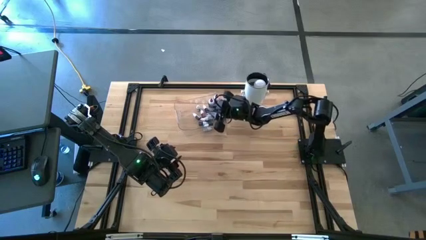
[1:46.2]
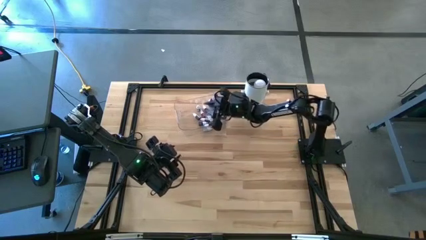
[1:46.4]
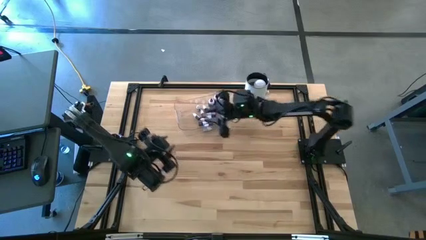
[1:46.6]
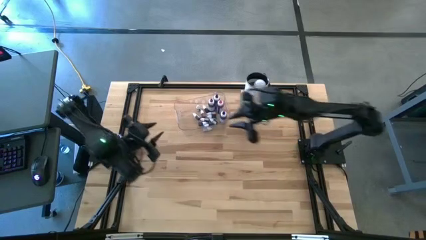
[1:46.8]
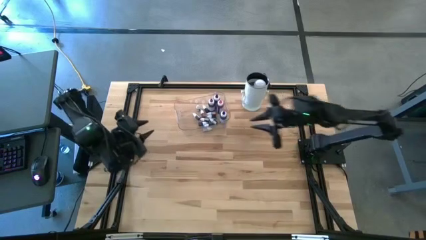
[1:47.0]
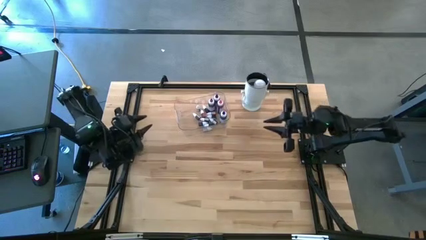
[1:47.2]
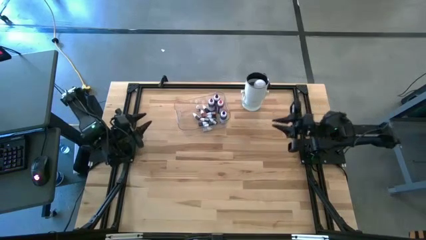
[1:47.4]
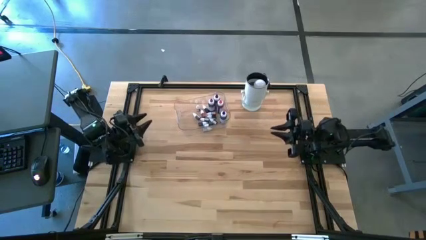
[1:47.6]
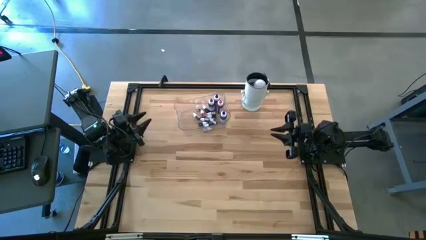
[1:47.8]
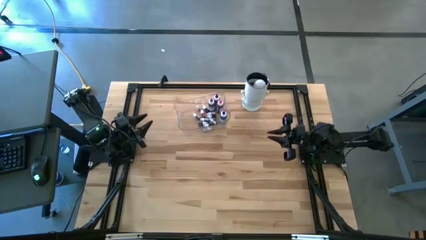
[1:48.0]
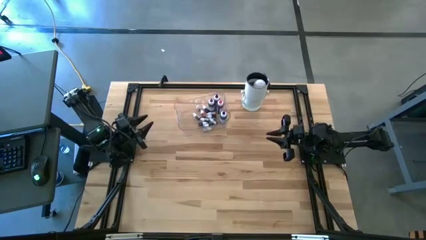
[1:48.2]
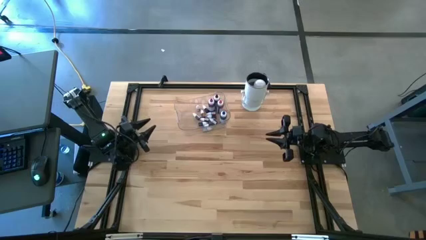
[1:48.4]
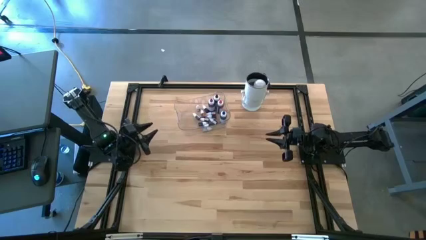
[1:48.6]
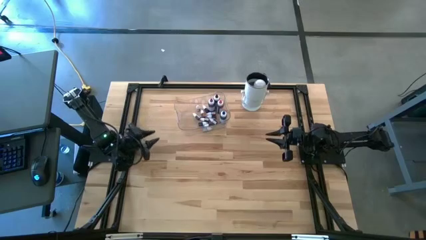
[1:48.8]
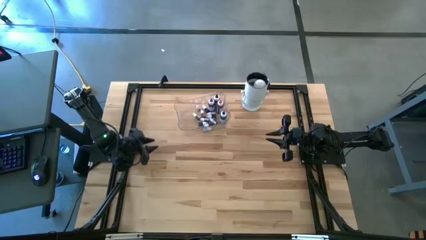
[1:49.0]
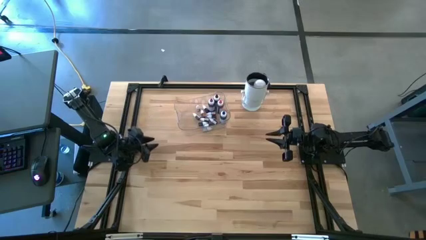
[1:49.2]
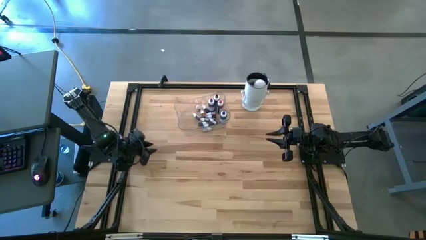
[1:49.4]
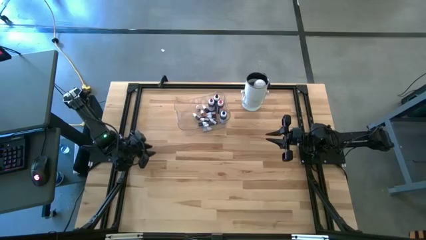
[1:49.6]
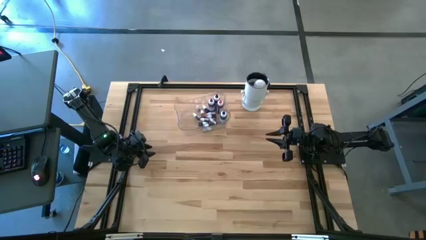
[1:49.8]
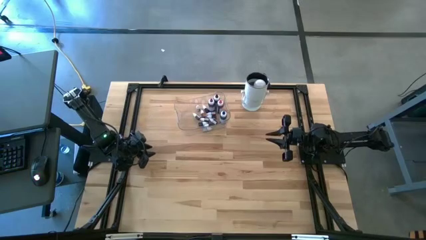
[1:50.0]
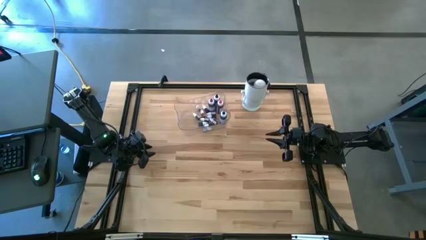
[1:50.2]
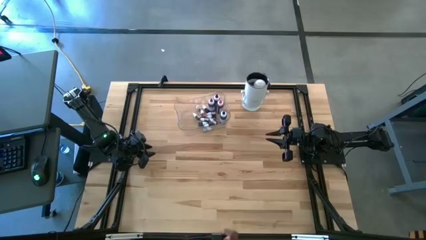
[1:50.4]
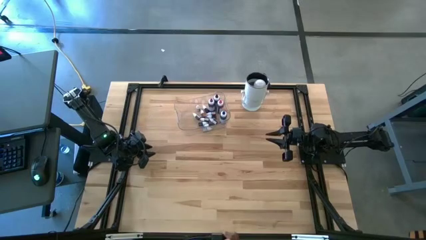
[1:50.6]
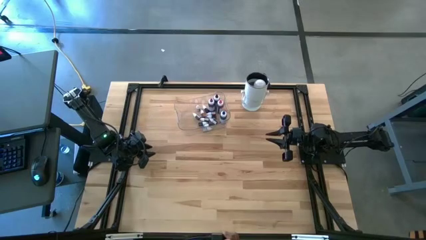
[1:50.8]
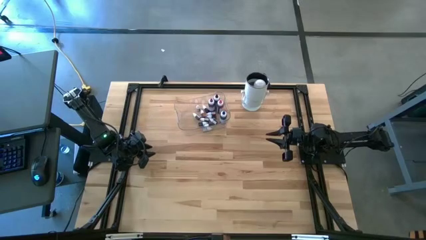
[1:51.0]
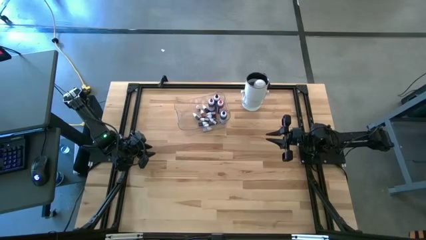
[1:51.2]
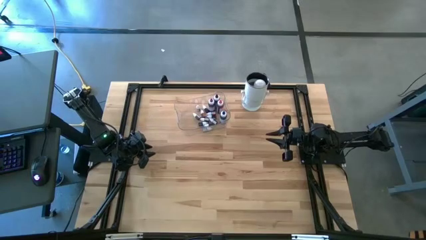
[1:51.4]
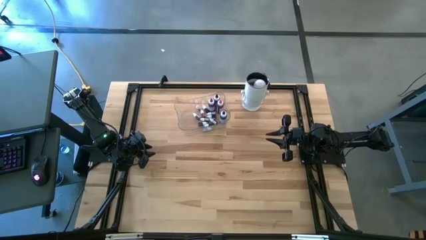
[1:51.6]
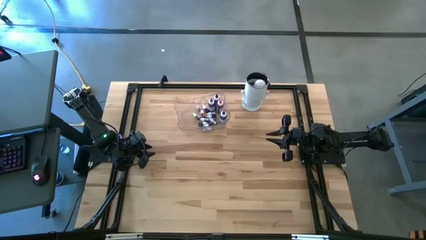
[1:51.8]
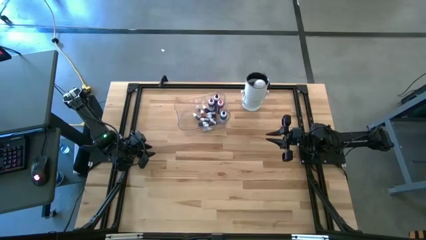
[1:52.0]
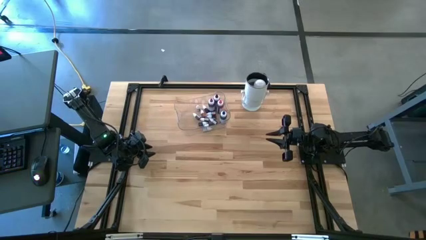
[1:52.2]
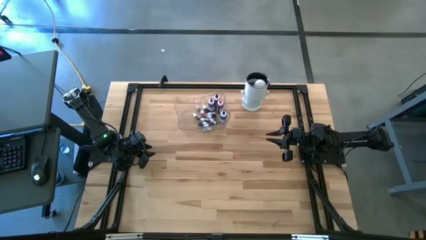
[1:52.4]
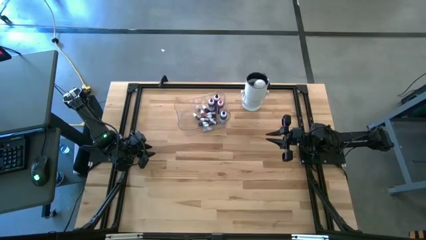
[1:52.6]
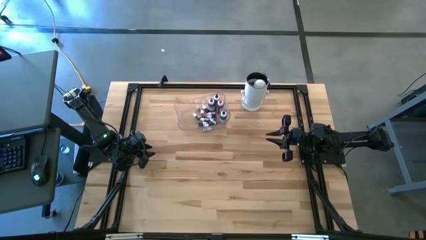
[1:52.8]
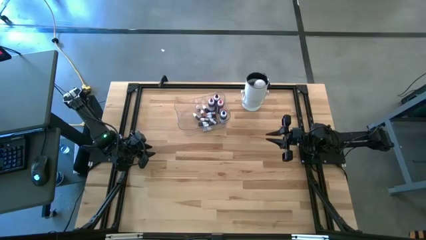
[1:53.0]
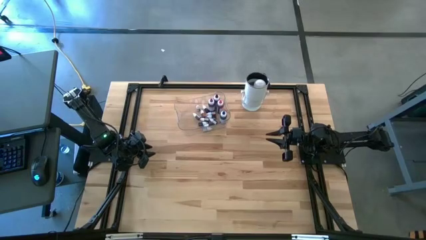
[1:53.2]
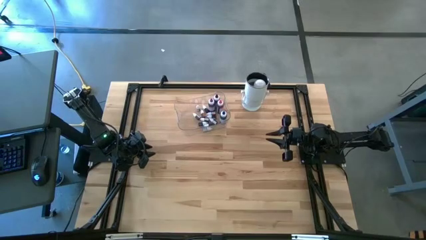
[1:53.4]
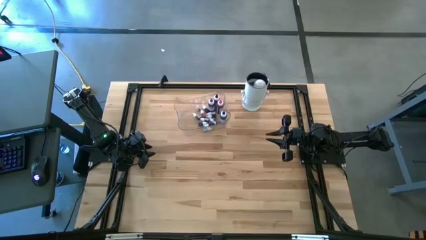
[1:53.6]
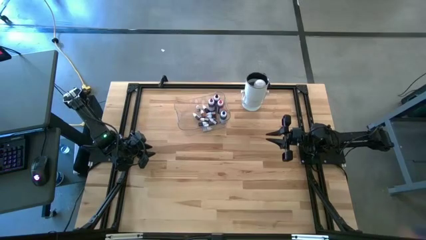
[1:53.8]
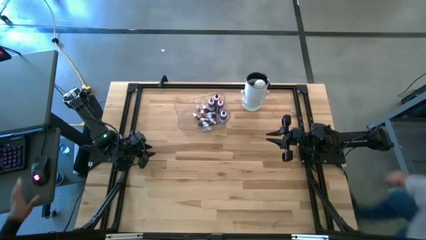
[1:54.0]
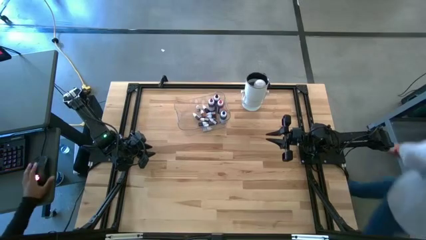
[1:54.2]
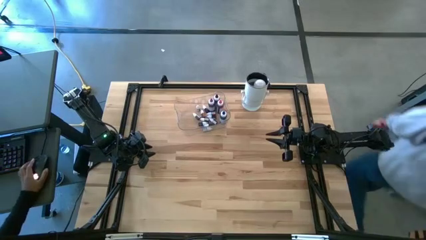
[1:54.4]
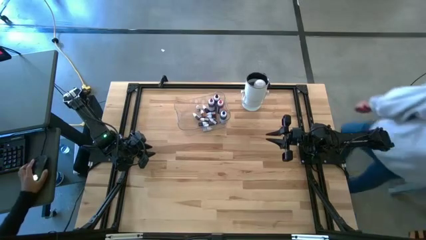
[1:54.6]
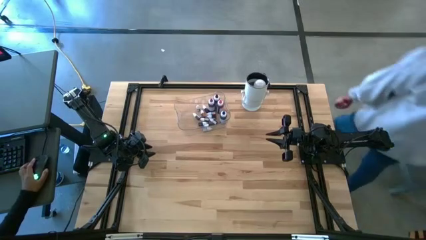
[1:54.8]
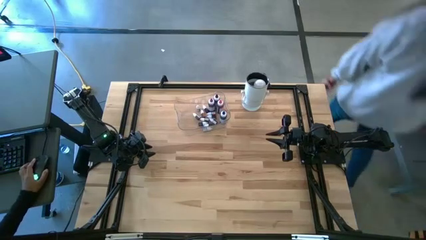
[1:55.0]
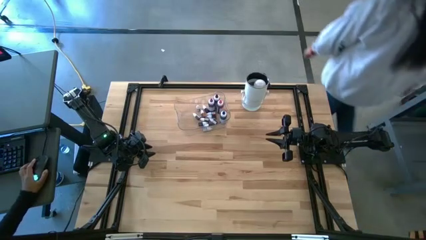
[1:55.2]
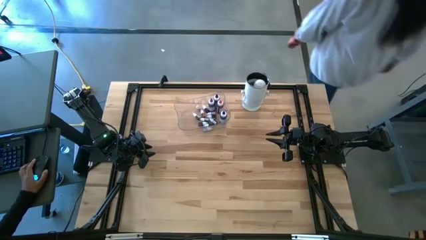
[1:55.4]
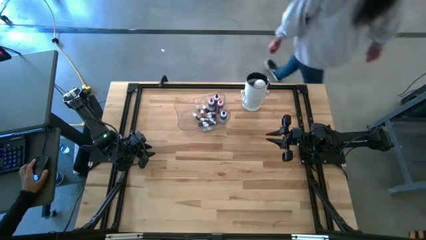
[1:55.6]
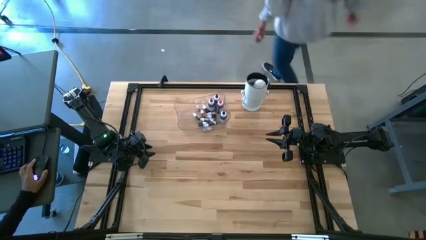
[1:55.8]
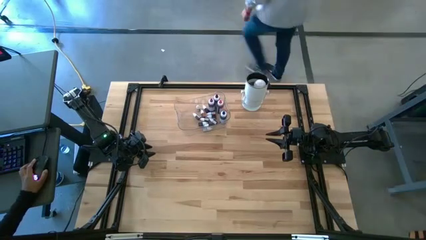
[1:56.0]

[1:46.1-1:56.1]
Task: Pick & Place food coloring
Return to Home Position

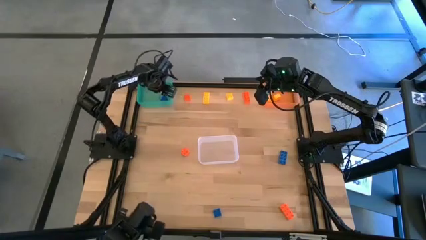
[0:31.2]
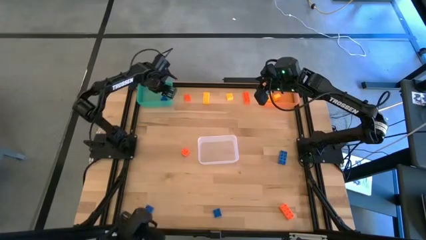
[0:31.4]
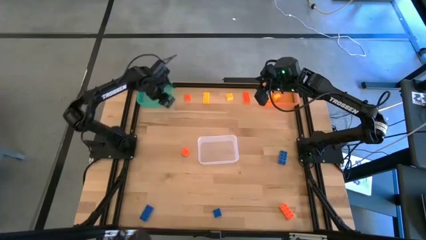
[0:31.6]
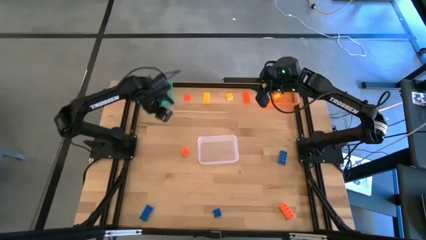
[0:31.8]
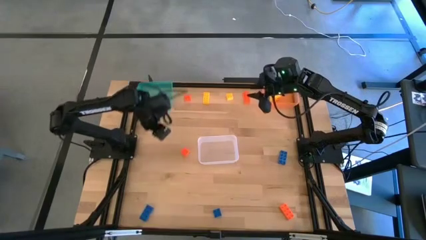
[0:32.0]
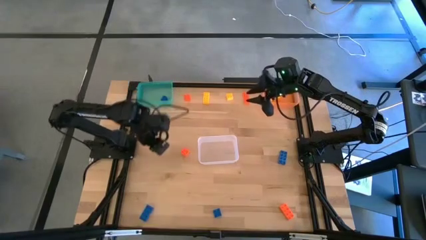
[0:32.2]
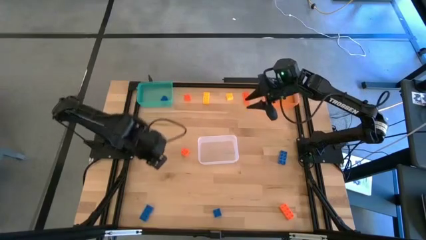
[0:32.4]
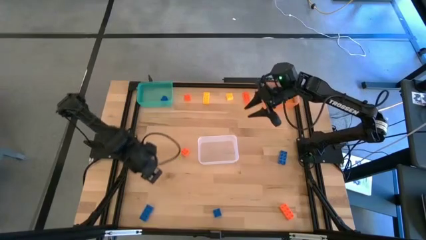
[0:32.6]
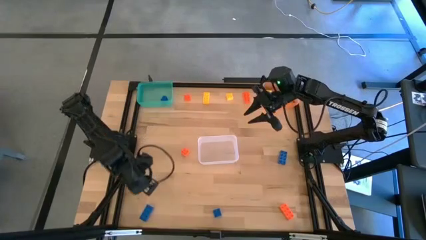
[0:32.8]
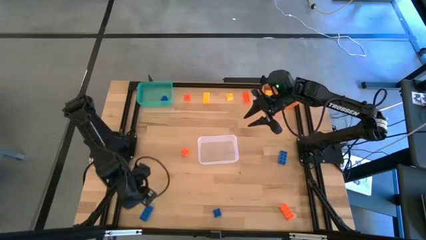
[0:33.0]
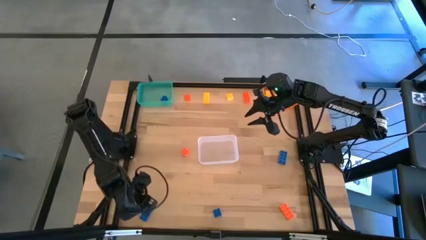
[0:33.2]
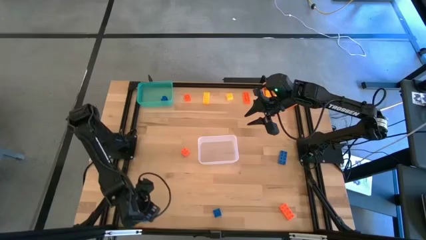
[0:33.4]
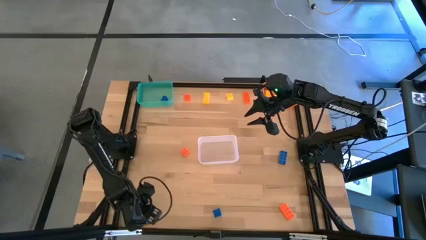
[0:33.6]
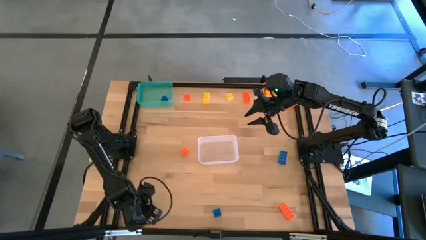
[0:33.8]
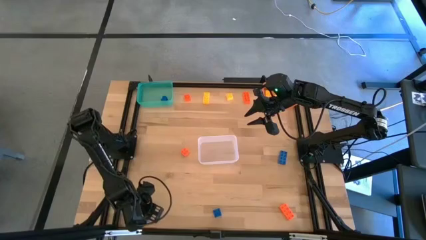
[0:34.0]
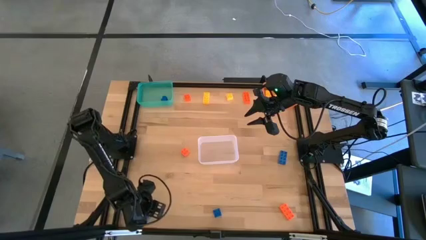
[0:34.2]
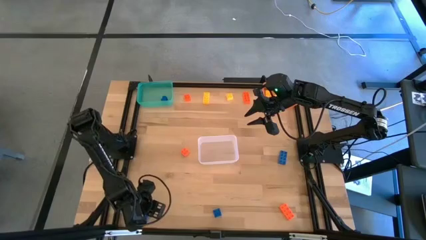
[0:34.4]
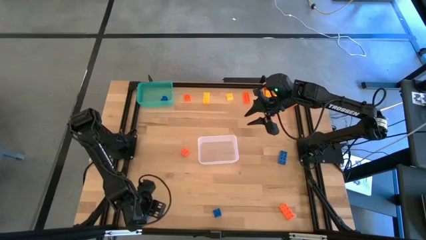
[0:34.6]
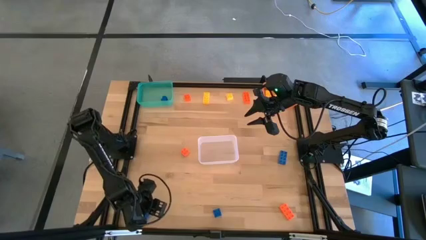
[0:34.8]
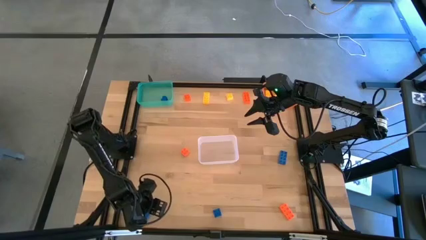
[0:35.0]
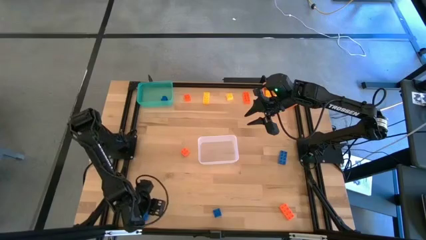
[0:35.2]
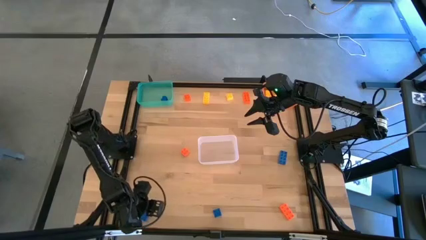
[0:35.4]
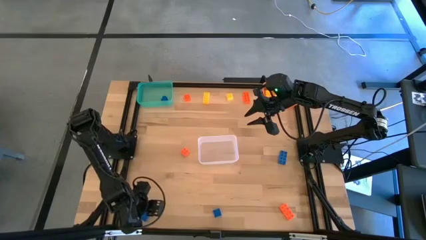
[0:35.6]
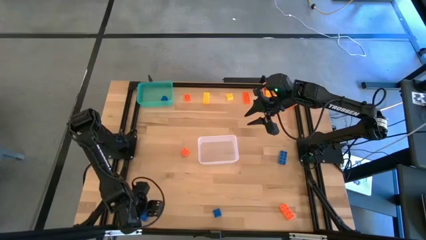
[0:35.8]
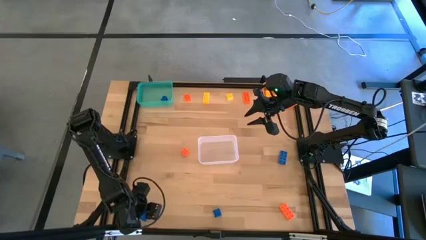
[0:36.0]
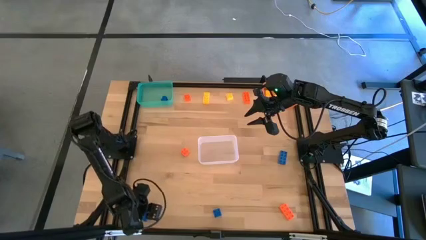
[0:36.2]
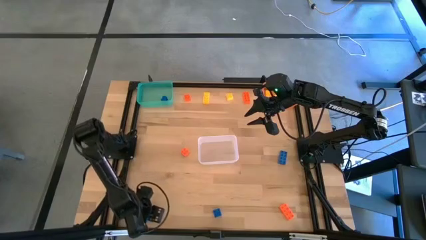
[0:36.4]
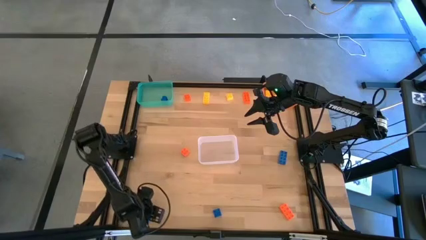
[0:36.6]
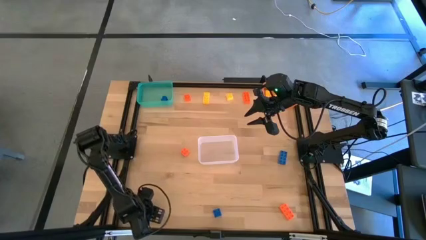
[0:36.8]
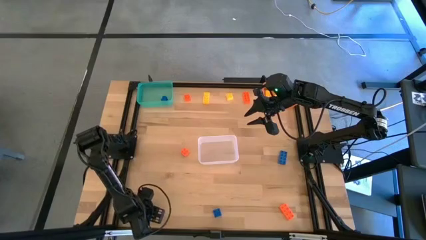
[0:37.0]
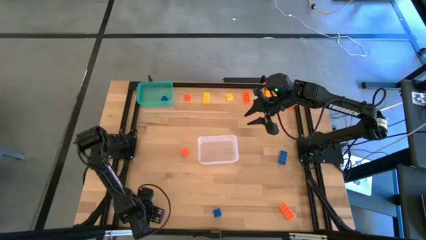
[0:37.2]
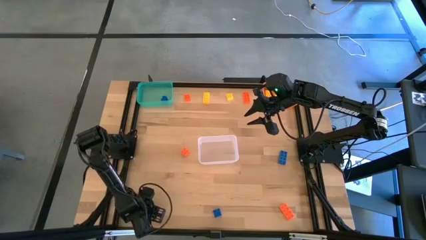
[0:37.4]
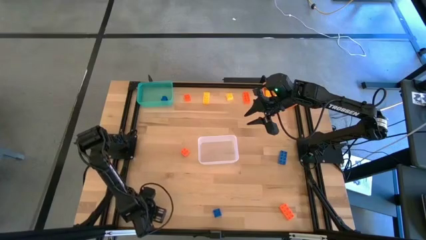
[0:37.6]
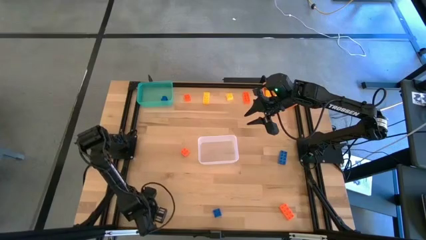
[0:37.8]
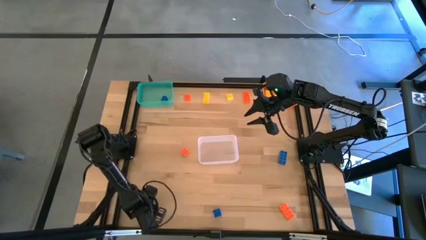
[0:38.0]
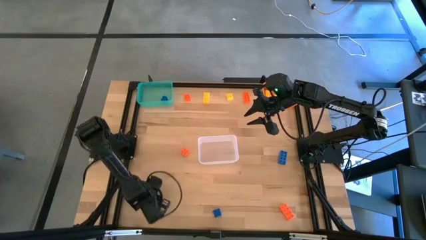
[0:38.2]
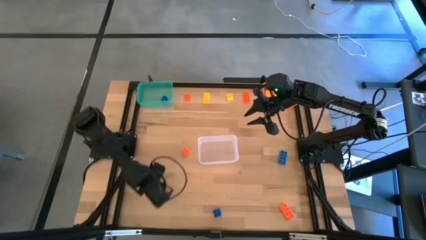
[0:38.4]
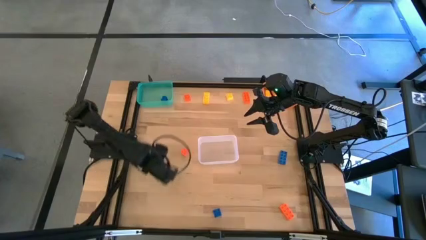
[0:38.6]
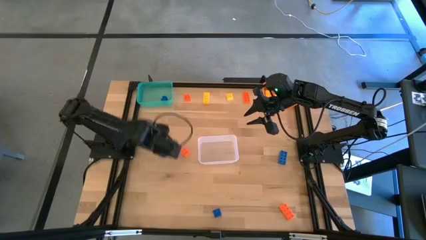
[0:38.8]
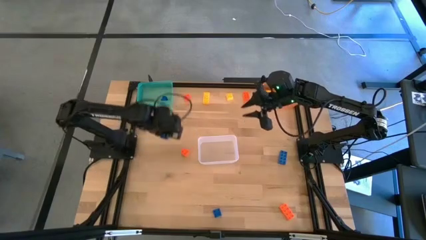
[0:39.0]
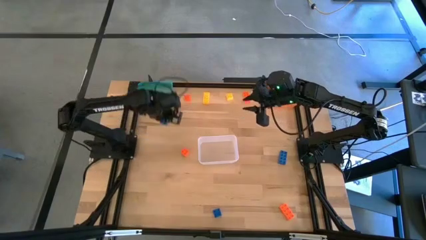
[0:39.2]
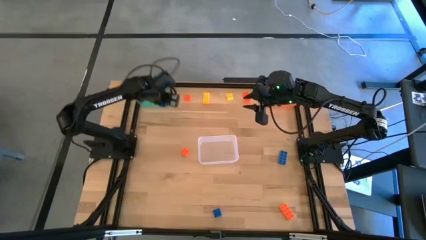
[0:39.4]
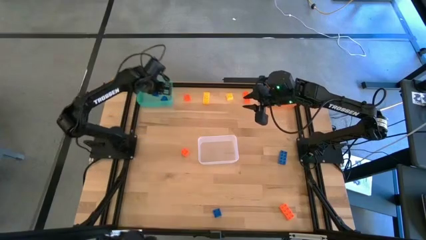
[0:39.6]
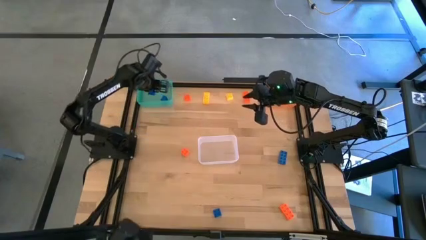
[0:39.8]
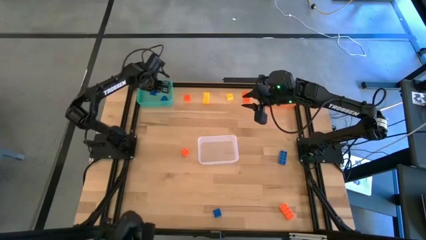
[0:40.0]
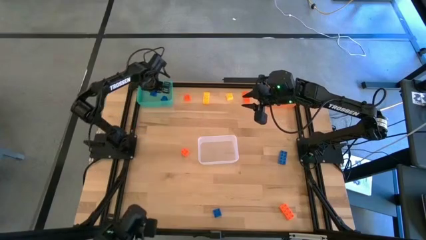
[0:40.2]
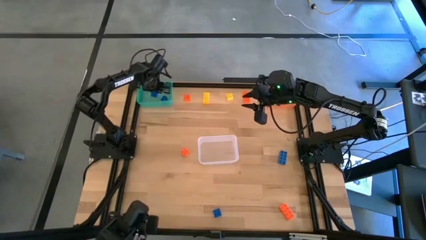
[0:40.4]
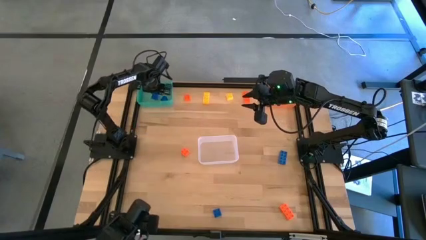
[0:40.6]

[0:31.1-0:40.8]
Task: Sort & place blocks by color
Put the bottom left blue game piece into the blue bin
